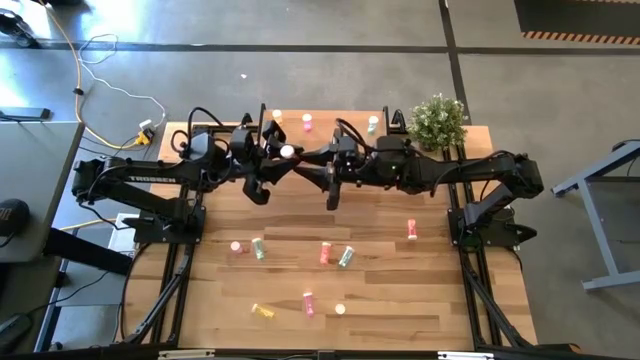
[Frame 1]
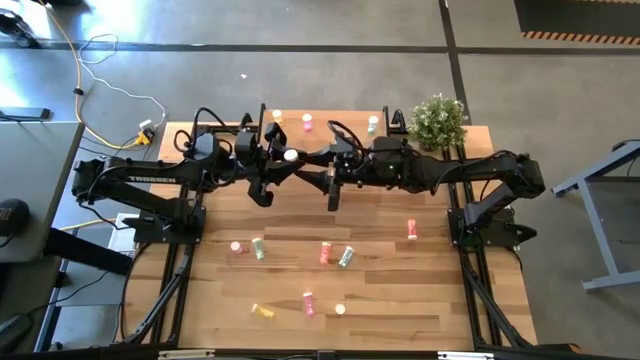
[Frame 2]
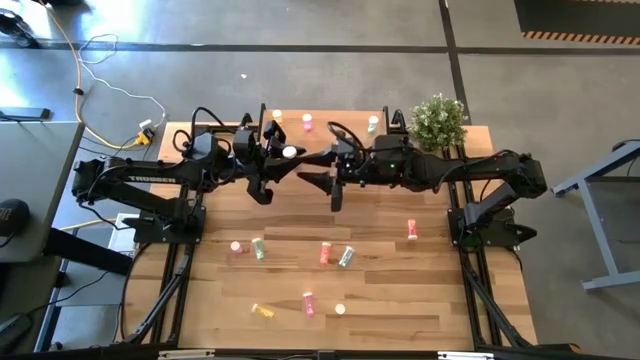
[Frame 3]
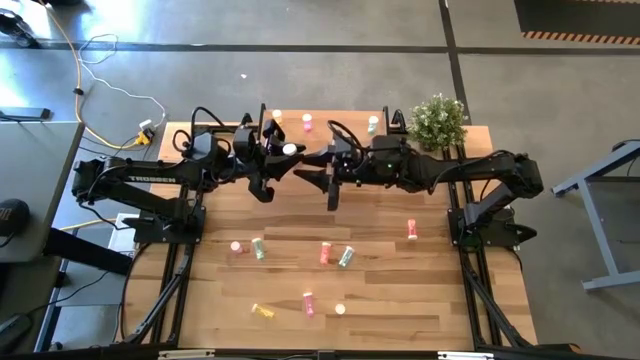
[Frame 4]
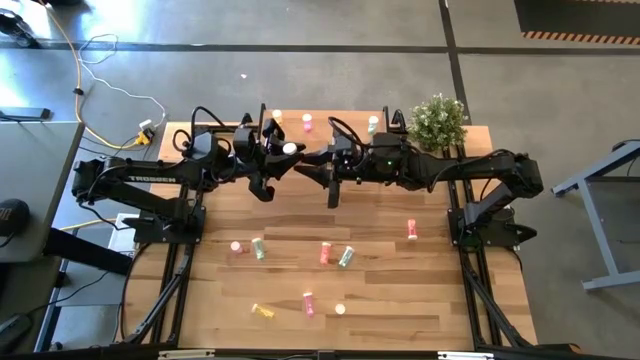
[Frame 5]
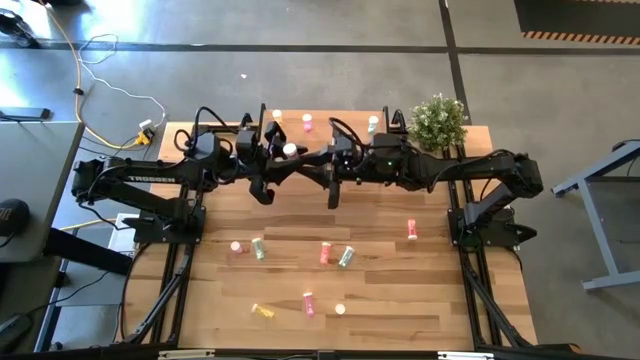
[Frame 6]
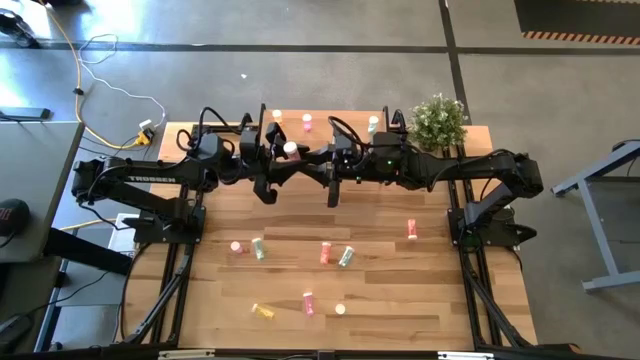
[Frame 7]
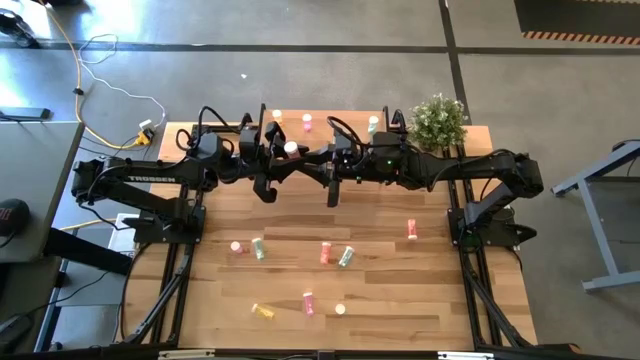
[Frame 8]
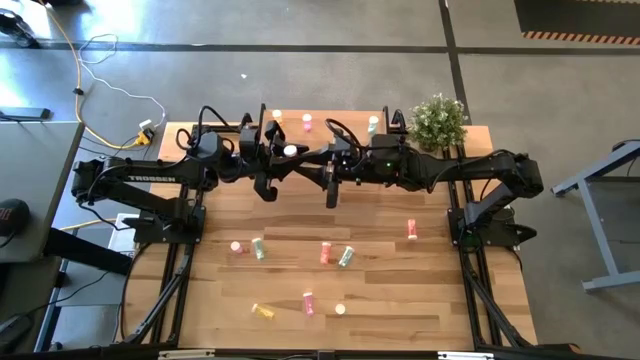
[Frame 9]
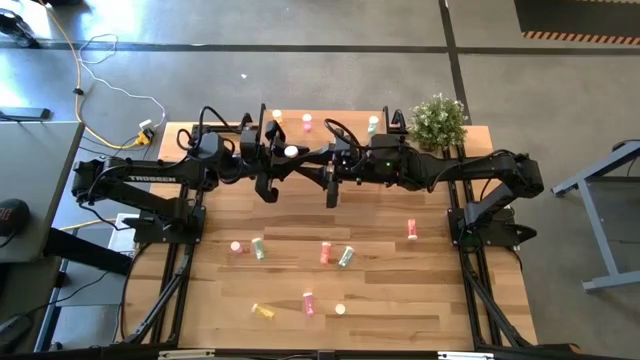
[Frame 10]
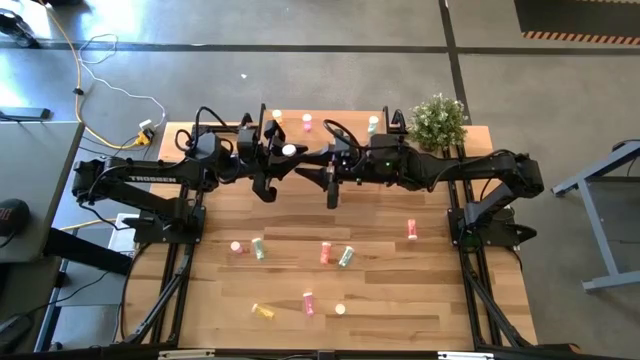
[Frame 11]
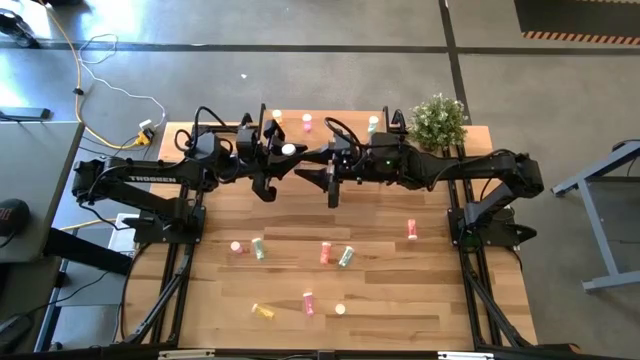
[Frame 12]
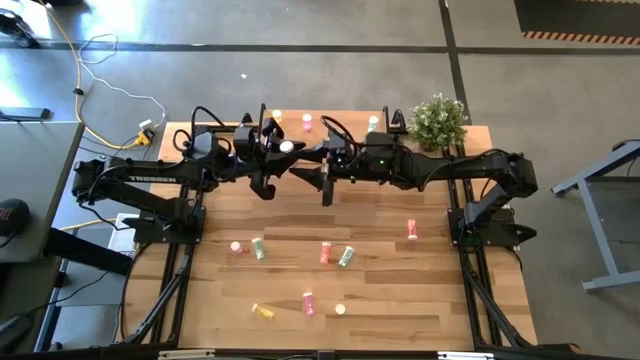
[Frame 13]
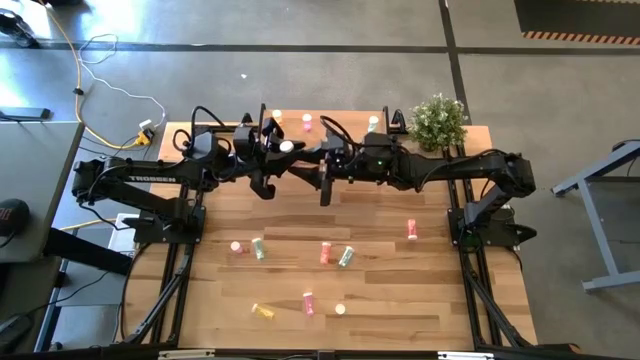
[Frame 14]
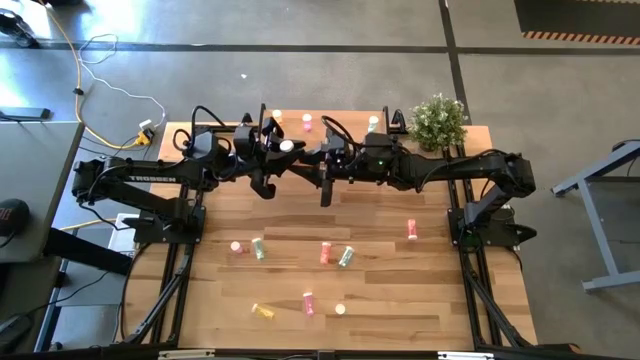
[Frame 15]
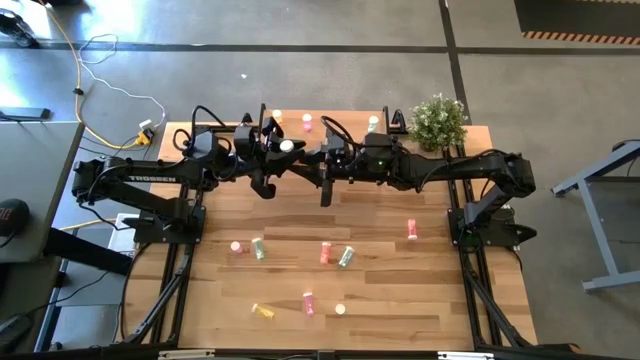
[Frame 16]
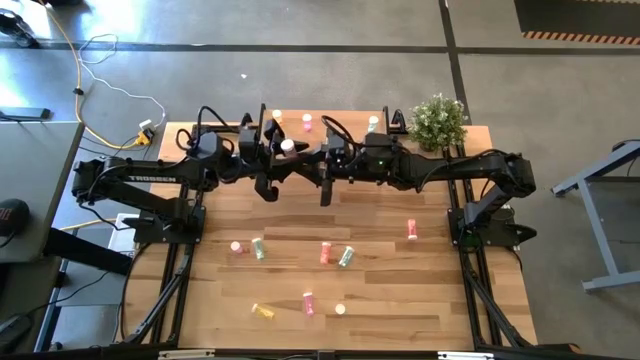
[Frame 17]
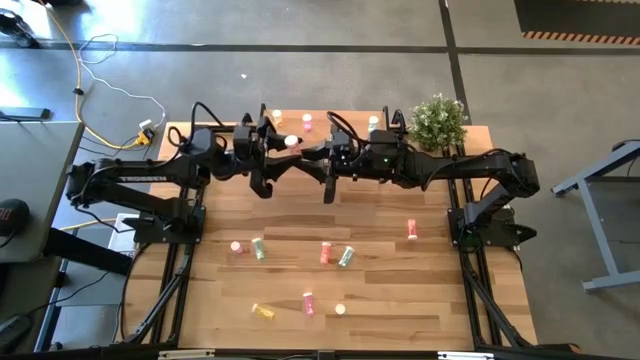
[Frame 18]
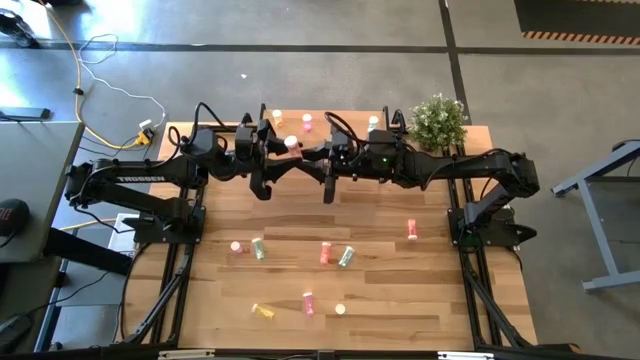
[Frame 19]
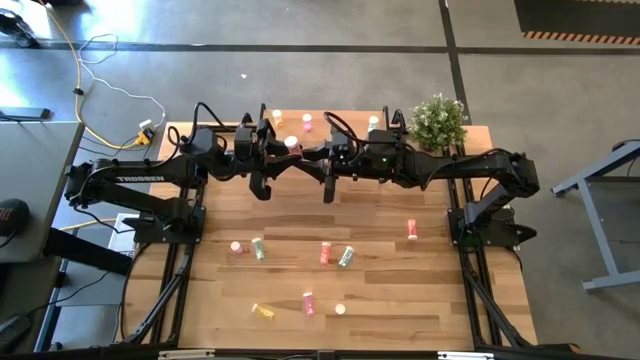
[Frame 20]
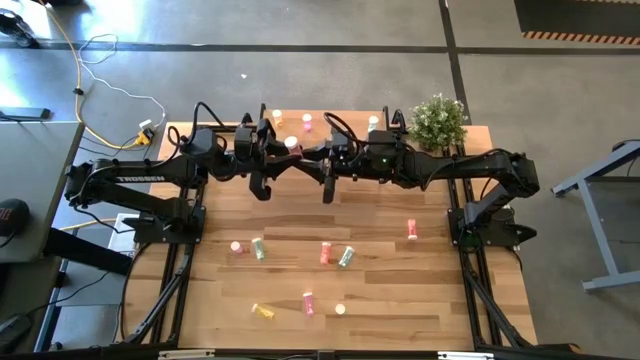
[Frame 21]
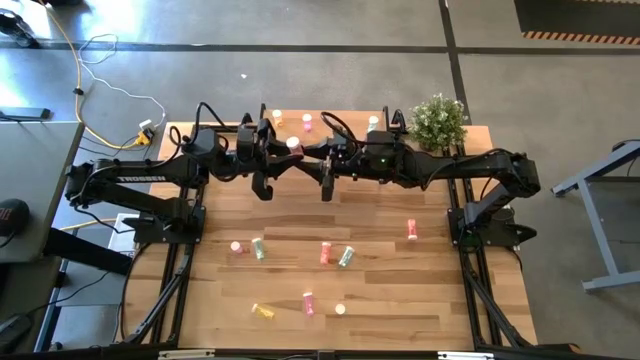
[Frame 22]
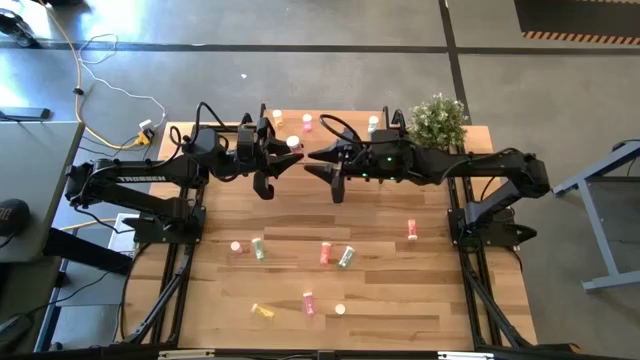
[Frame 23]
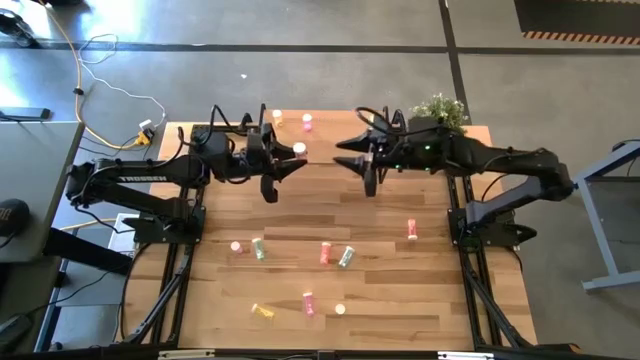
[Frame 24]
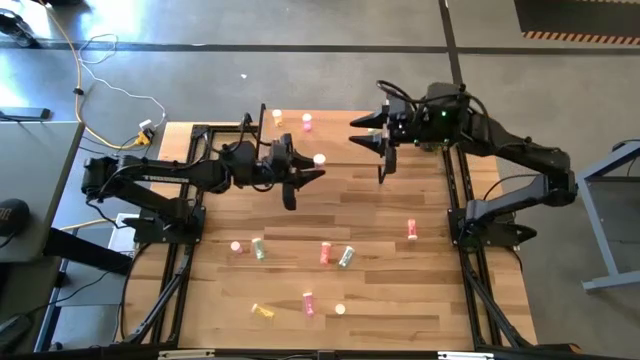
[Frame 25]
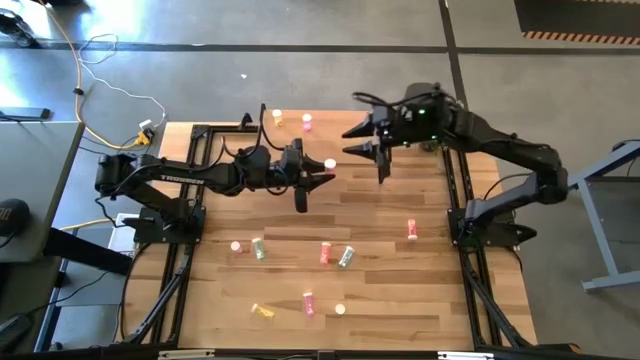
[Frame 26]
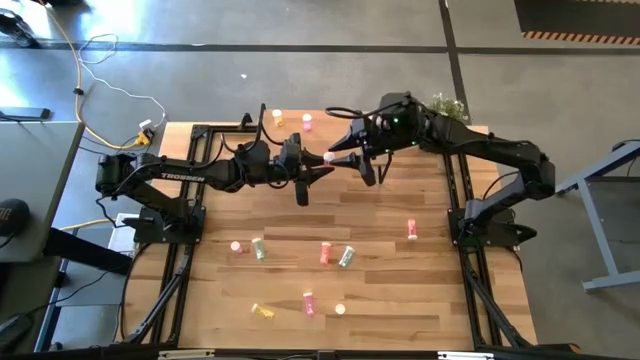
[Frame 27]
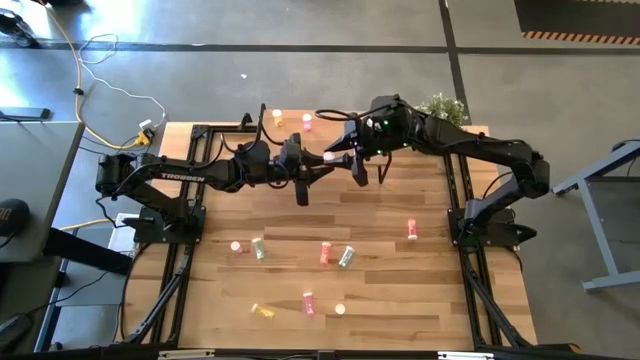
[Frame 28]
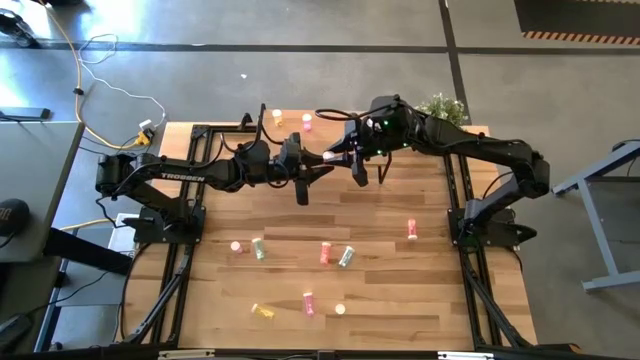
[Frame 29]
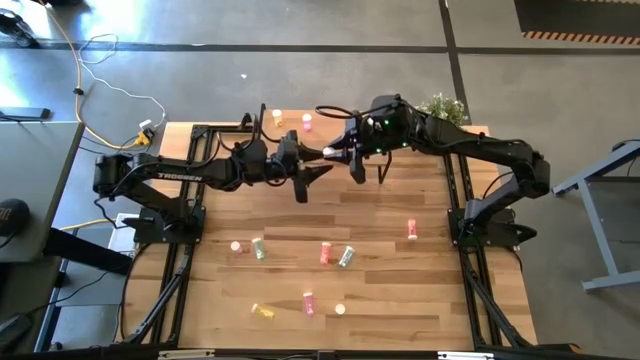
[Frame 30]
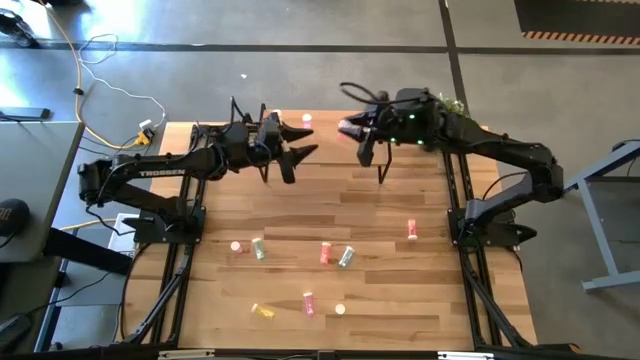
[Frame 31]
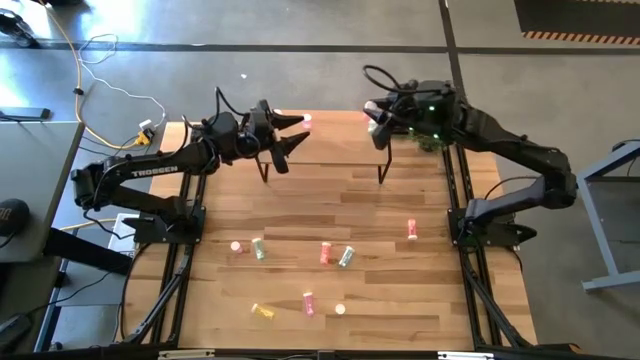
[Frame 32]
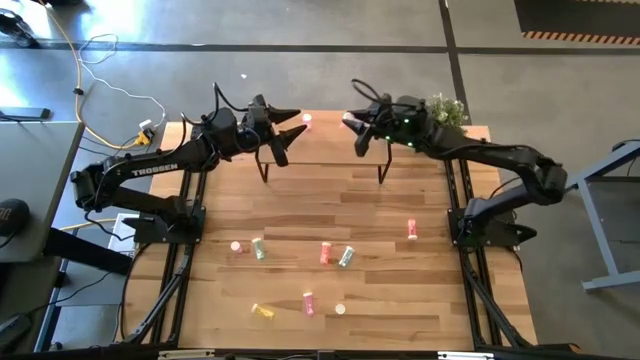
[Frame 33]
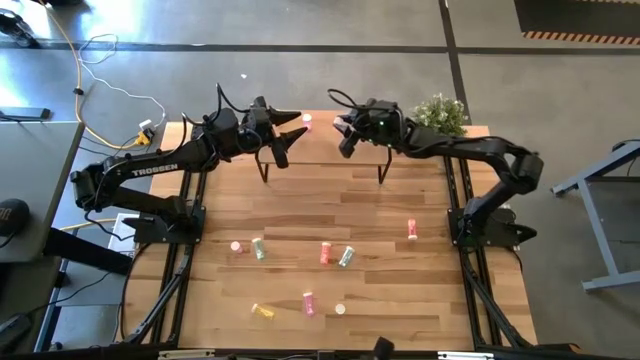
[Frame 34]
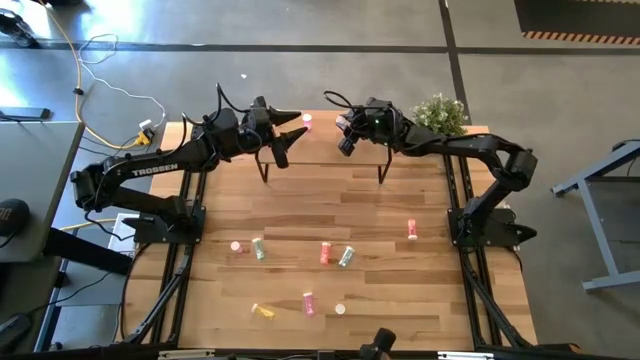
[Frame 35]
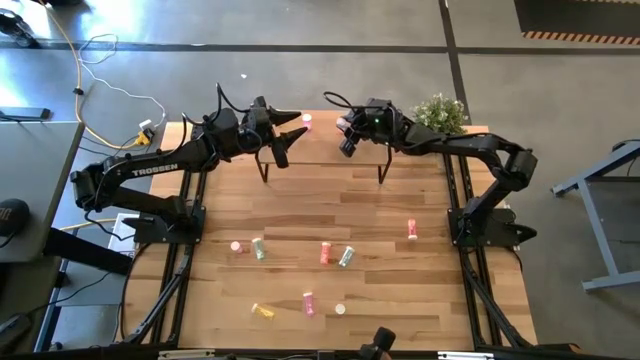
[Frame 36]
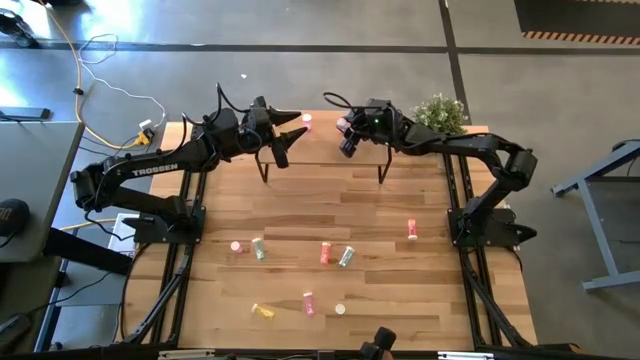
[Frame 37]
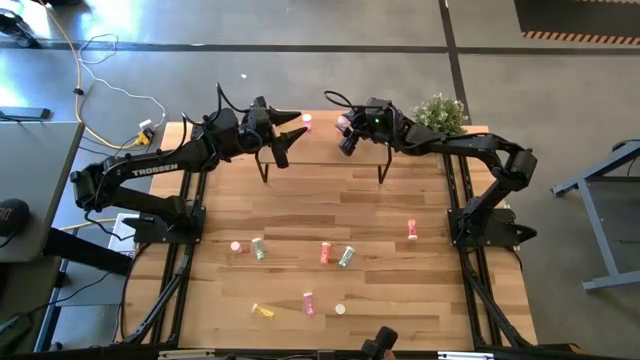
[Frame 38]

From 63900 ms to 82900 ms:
Task: Pick and place medicine bottles onto shelf by color
Put the bottom pink pill bottle on the shelf
